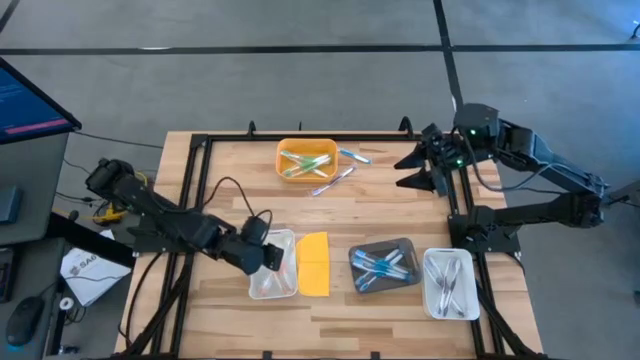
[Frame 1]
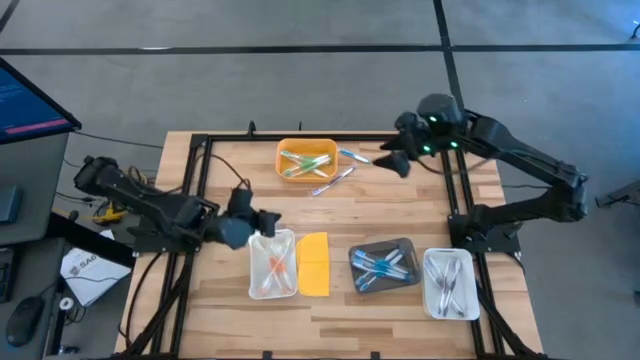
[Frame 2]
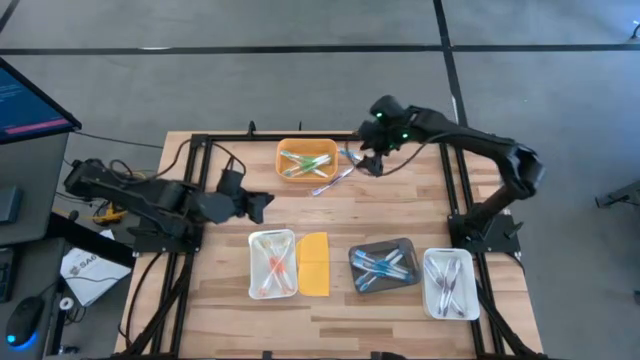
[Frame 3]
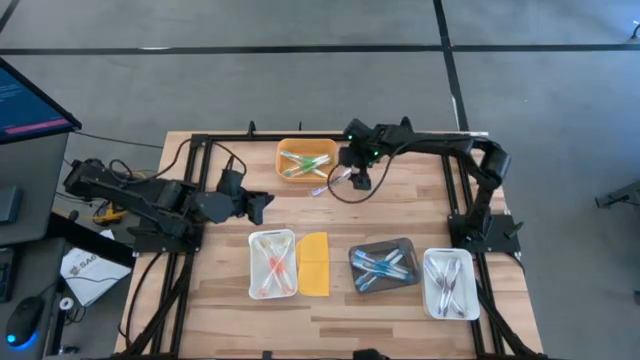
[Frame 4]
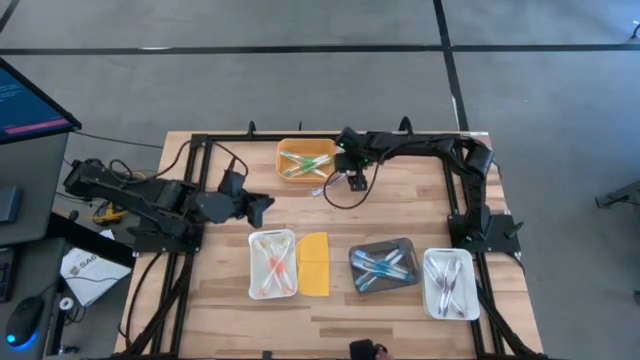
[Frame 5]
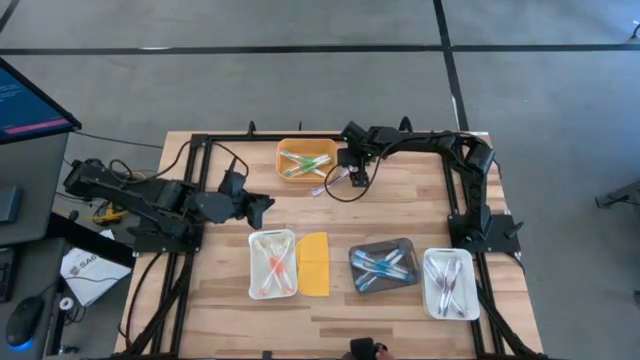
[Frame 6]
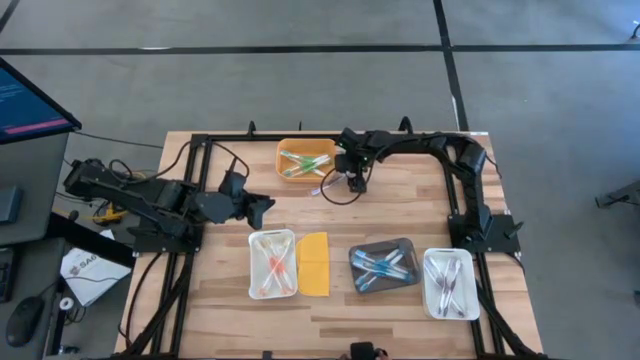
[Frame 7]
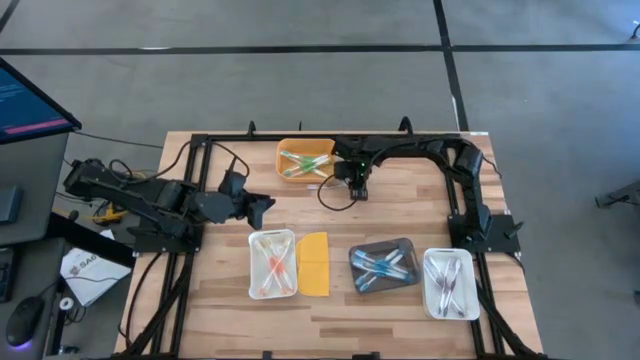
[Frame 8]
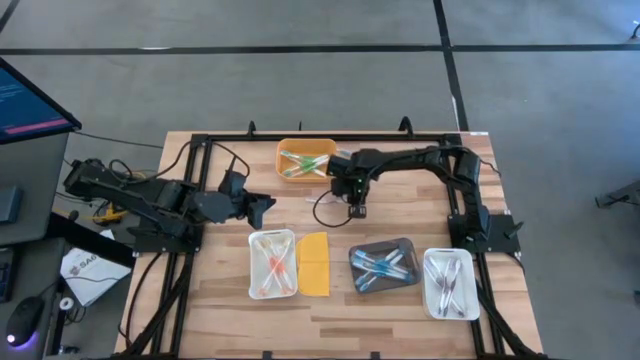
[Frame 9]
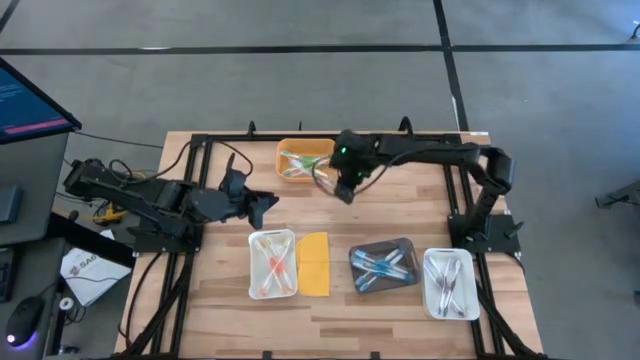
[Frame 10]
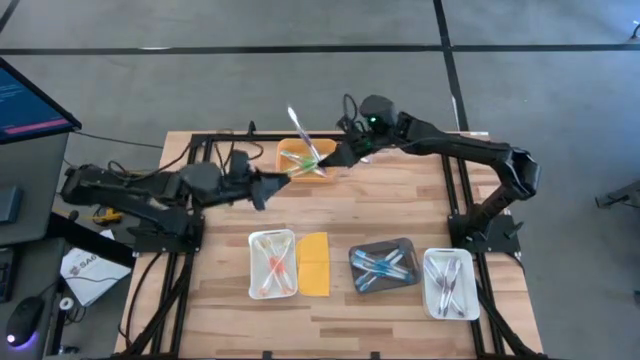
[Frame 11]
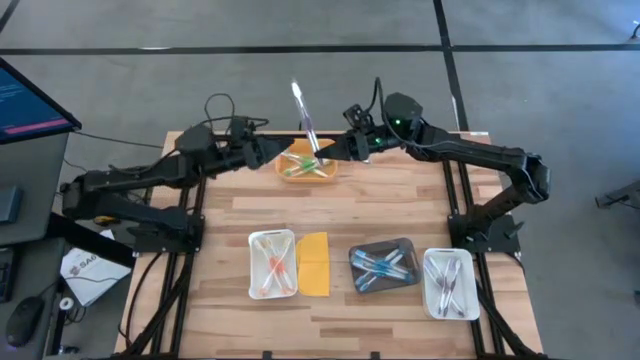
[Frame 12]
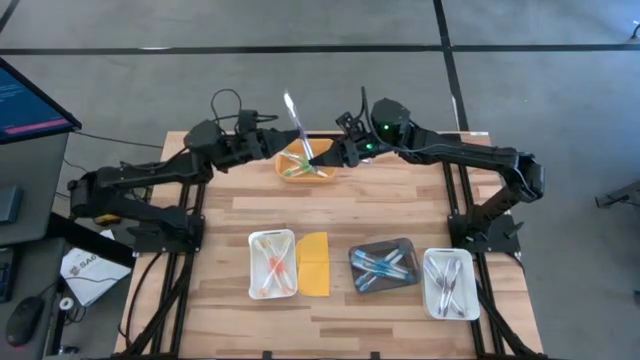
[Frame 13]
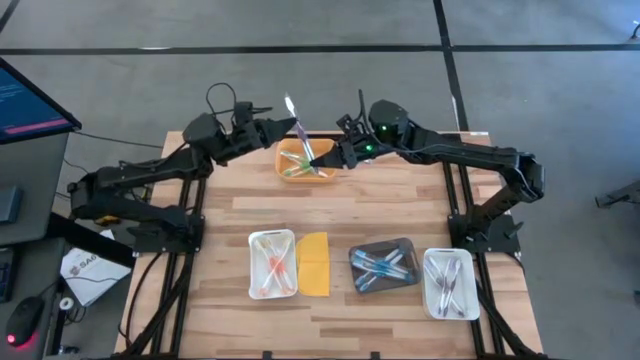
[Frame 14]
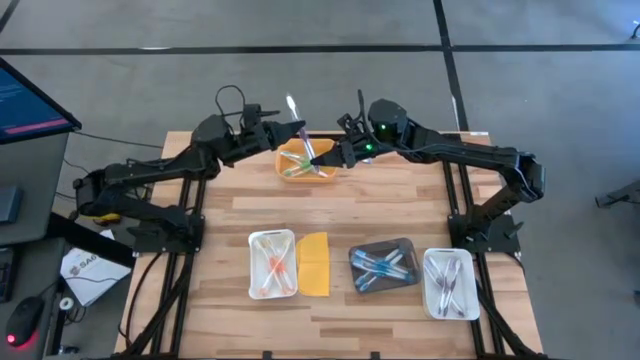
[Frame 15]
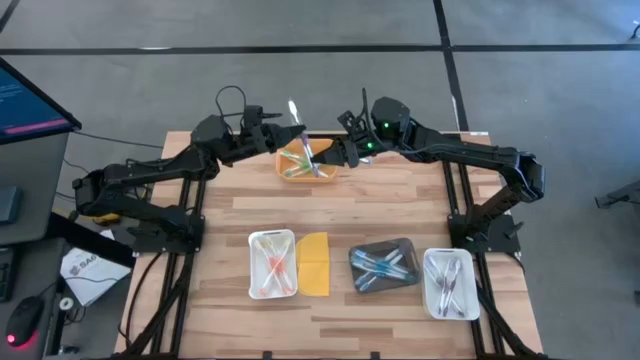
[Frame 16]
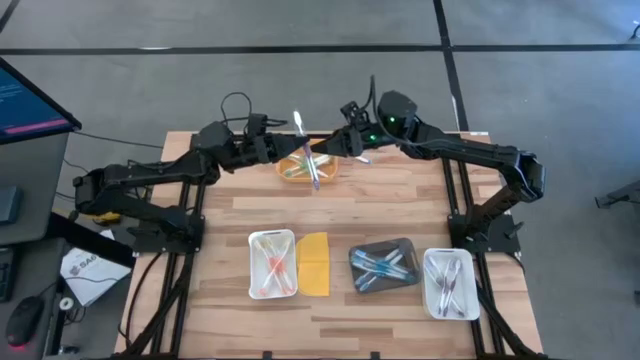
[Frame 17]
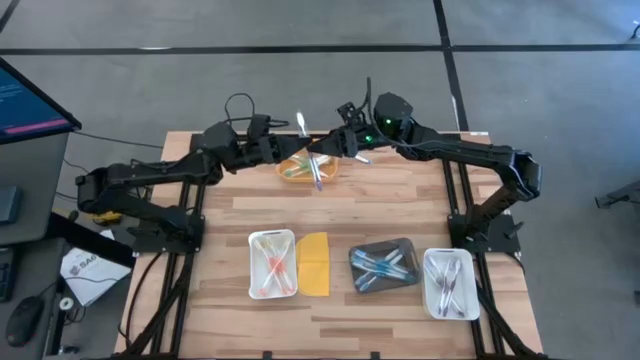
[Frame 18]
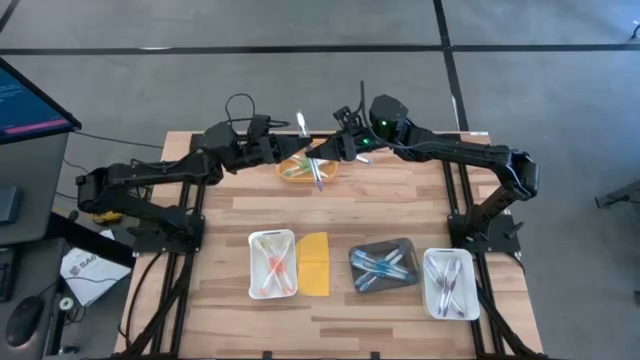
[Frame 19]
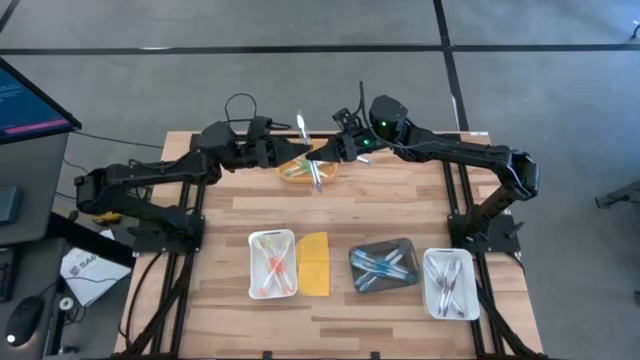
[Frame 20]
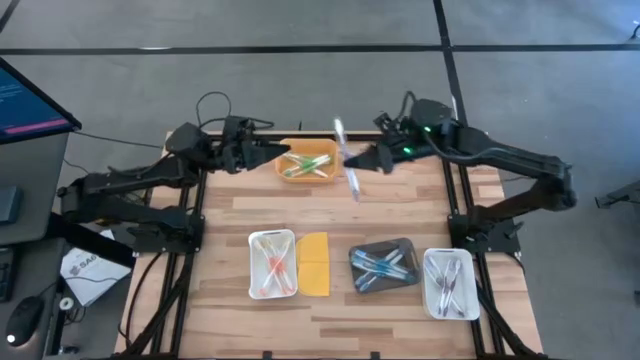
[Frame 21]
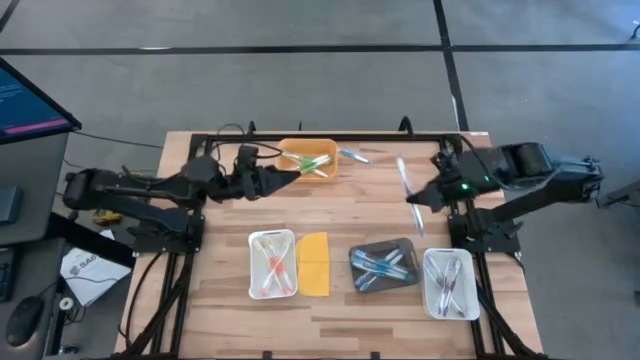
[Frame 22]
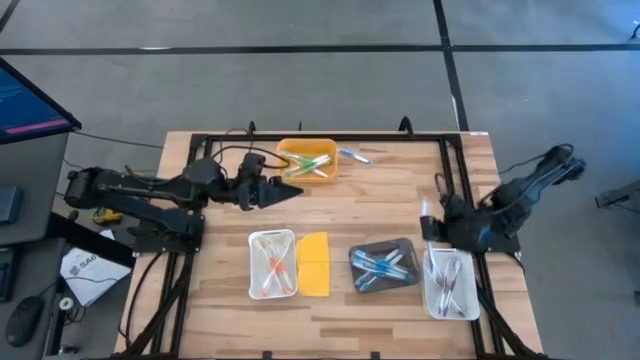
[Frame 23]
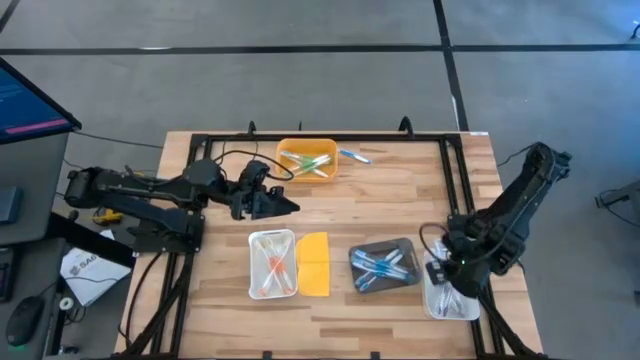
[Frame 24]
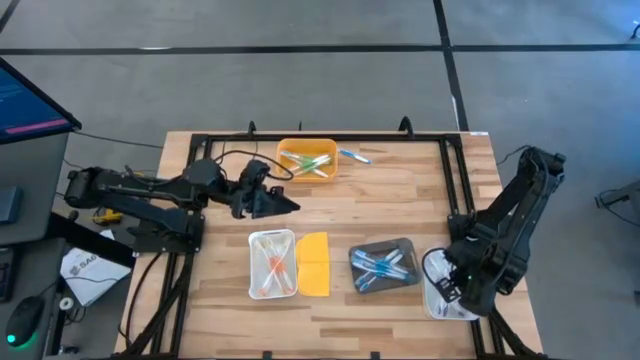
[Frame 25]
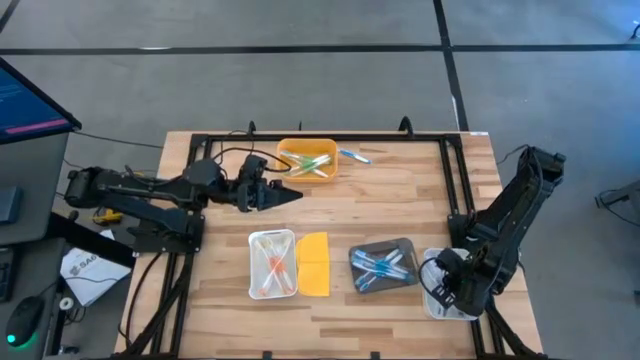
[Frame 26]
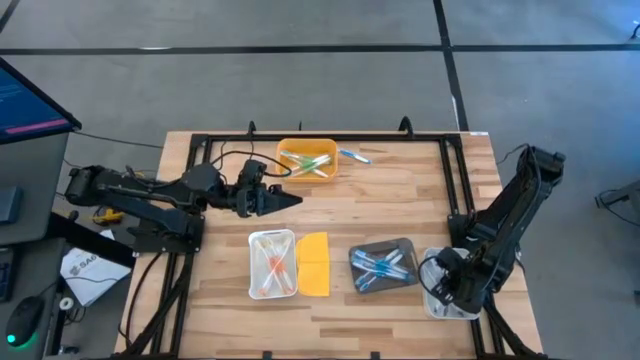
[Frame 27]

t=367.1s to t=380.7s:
Task: Pick & Place Toothbrushes
Put the purple toothbrush into the right white bin

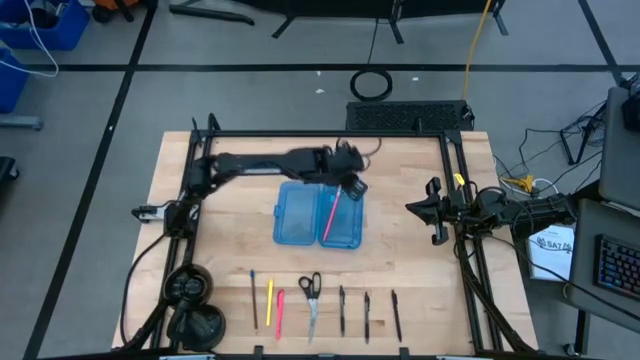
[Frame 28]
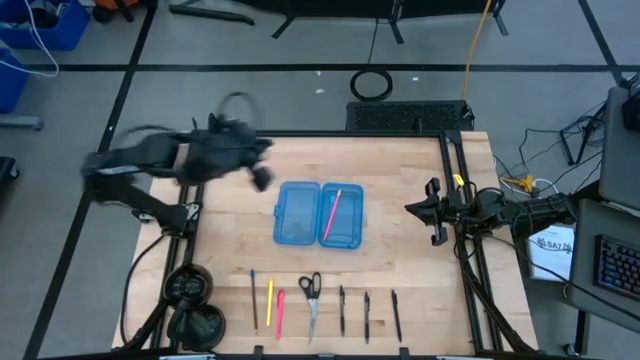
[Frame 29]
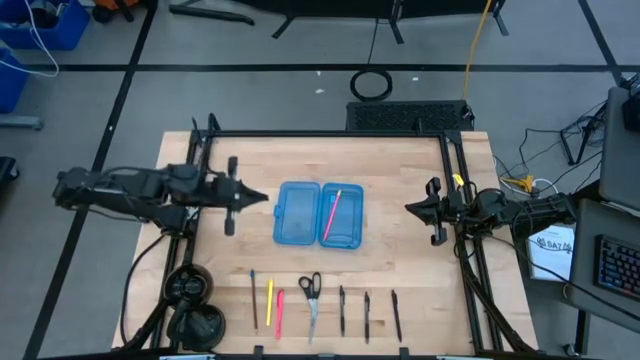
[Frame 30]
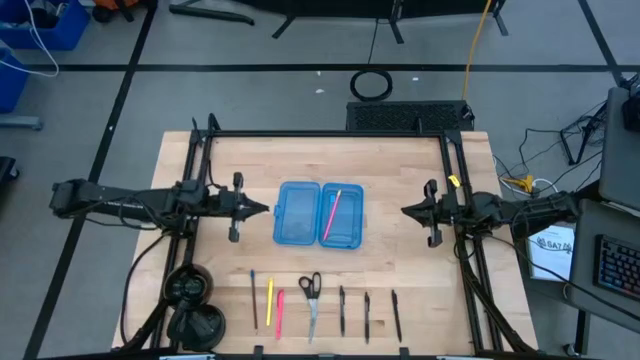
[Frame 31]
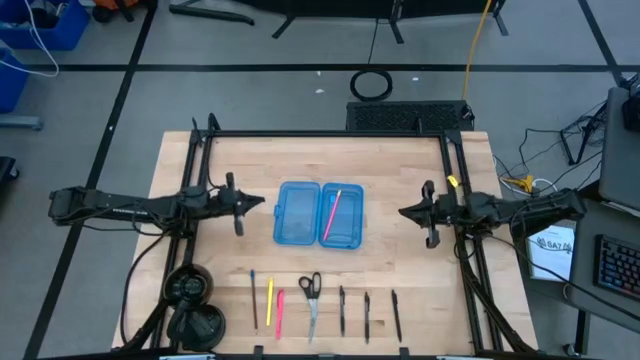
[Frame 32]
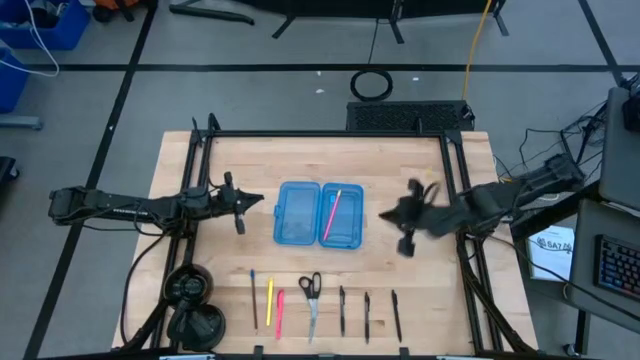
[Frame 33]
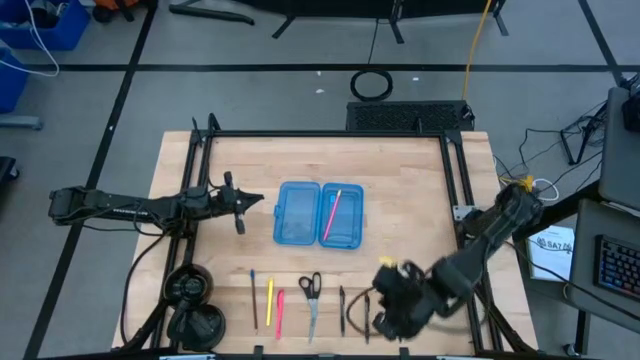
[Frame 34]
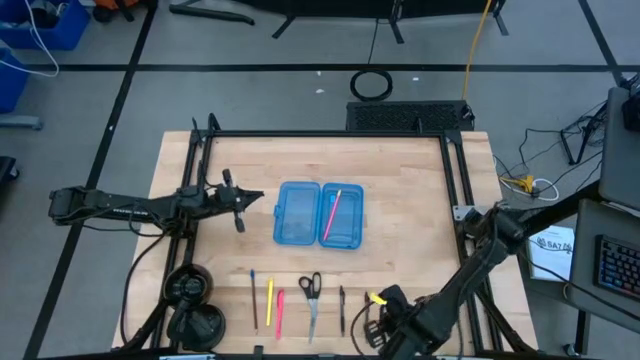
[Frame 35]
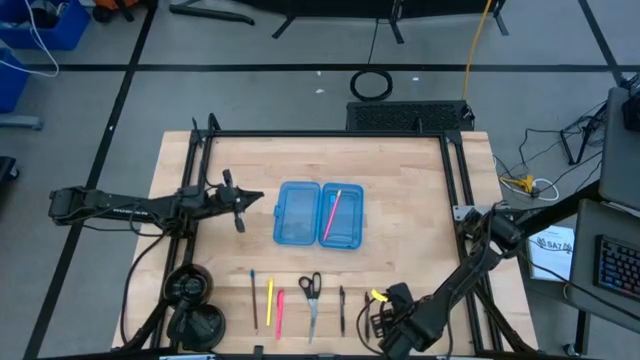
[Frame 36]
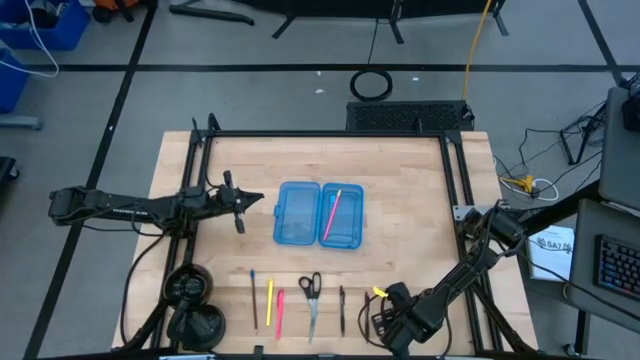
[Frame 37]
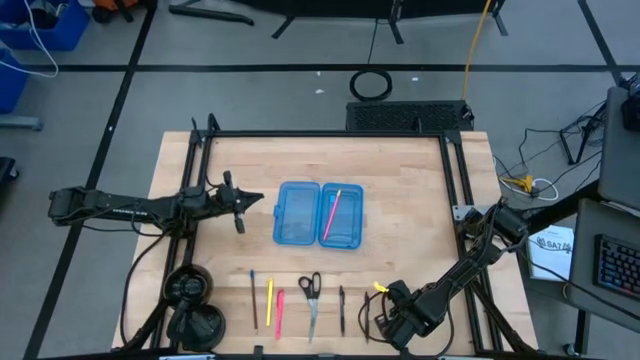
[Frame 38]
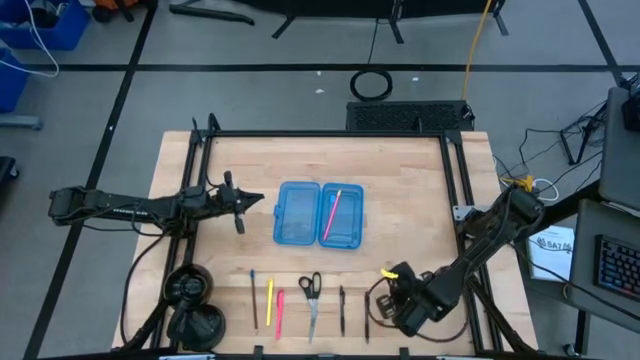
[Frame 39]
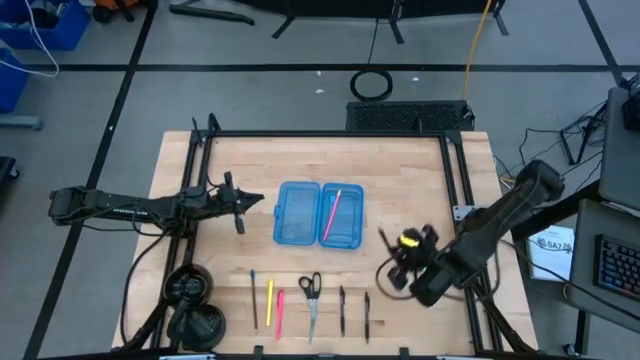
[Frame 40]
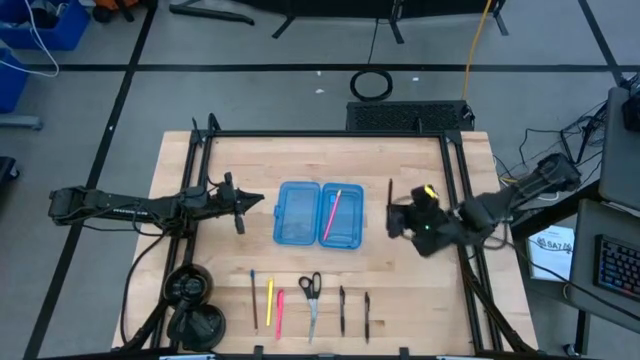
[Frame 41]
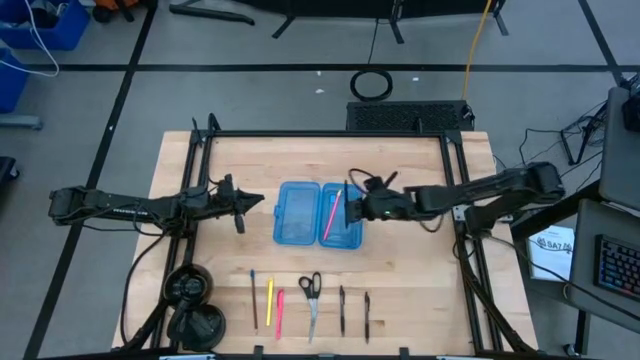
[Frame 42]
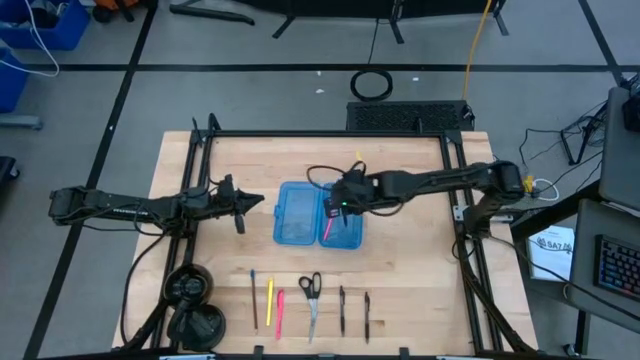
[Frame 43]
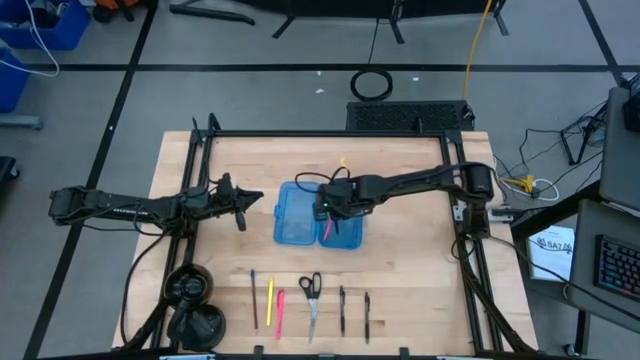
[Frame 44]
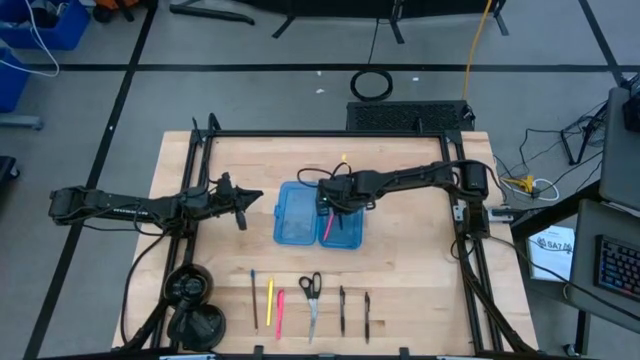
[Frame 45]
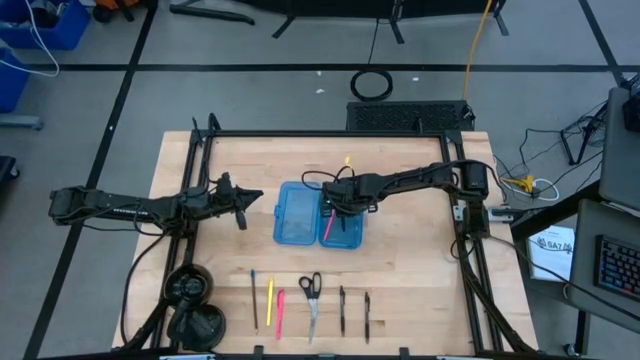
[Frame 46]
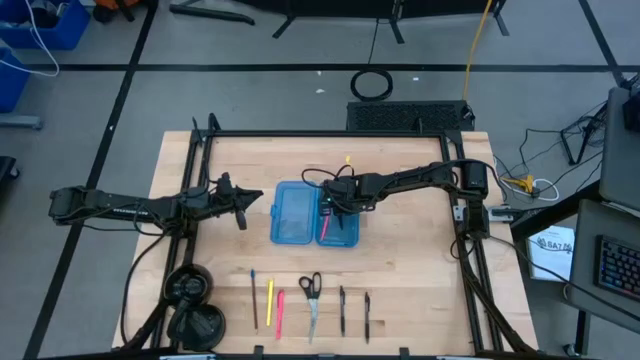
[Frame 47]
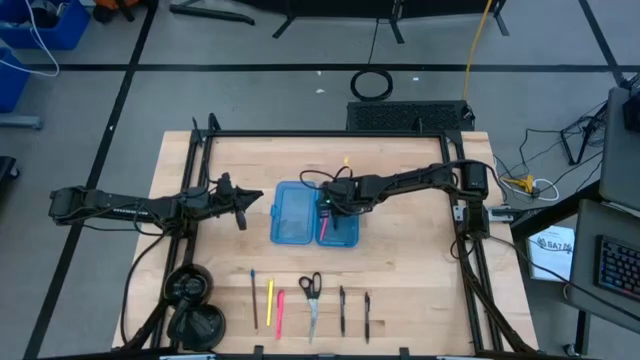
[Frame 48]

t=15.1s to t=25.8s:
Task: Pick & place school supplies into a supply box
Put the right black pen into the blue supply box
